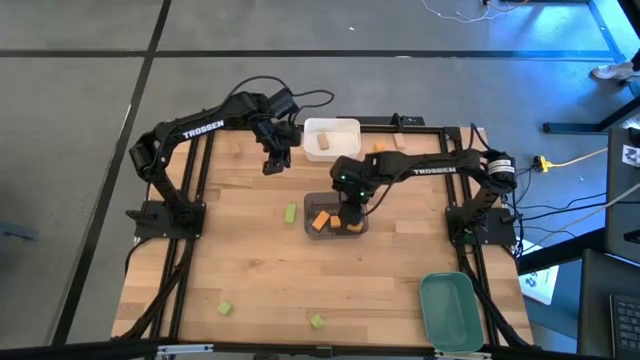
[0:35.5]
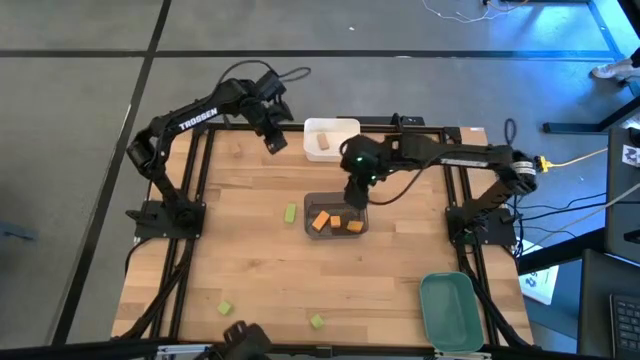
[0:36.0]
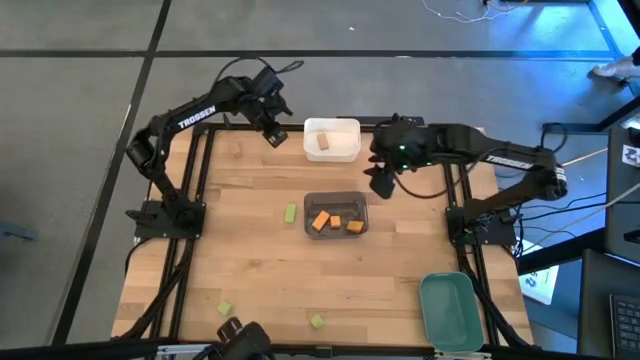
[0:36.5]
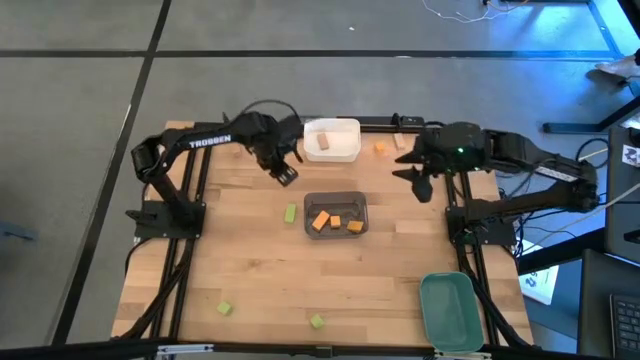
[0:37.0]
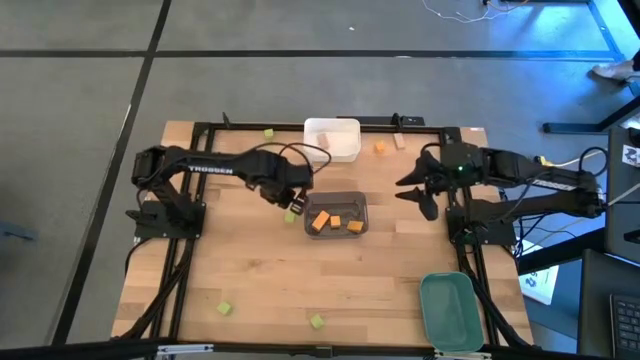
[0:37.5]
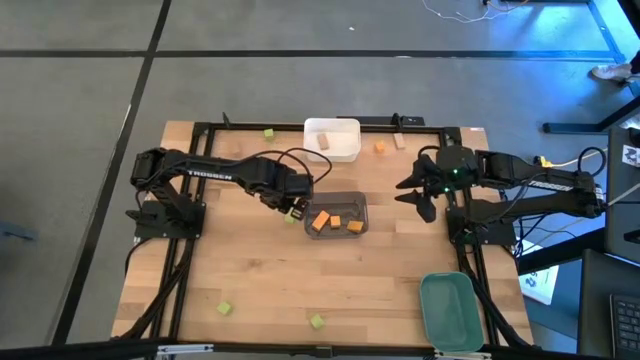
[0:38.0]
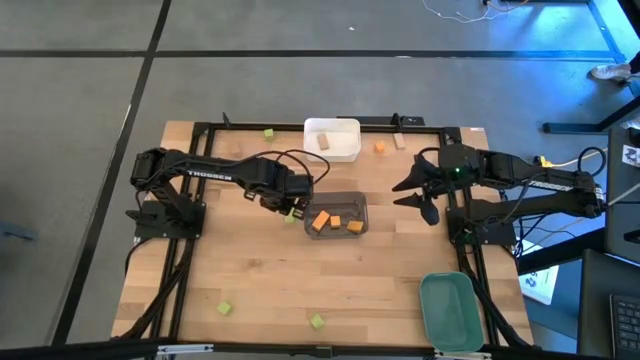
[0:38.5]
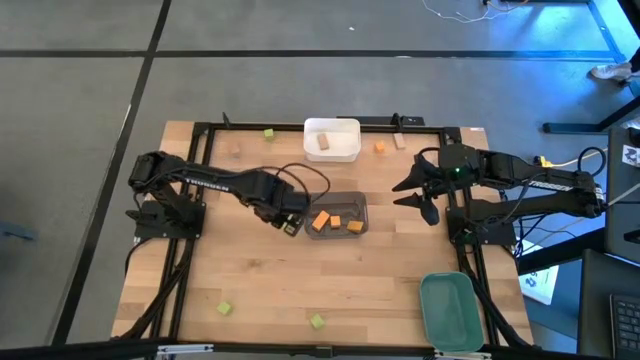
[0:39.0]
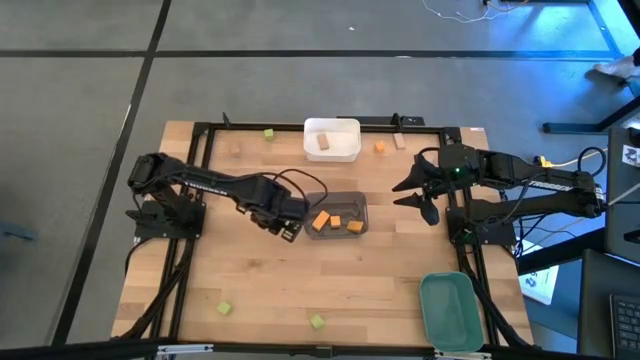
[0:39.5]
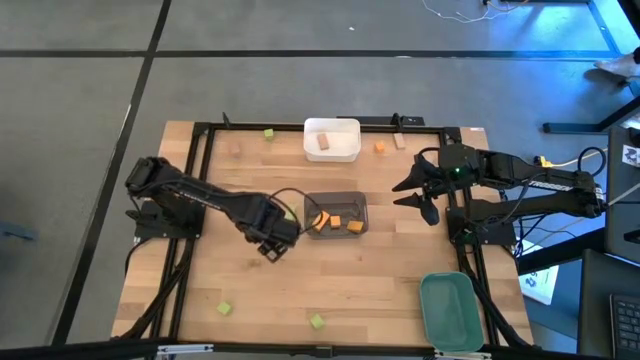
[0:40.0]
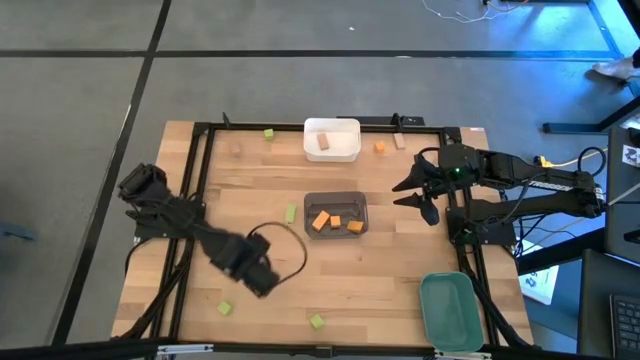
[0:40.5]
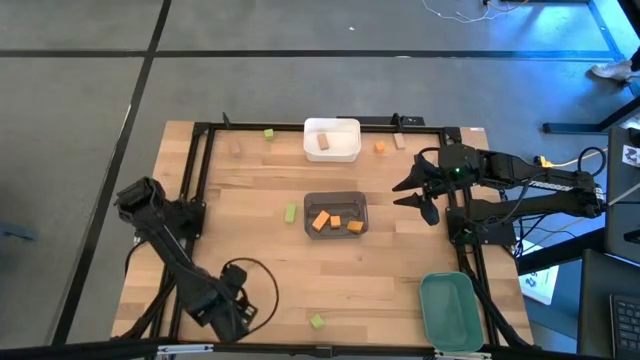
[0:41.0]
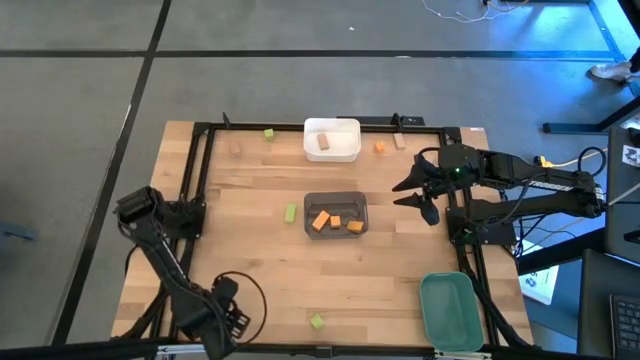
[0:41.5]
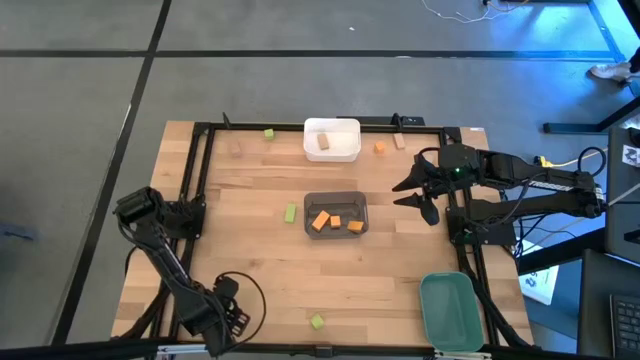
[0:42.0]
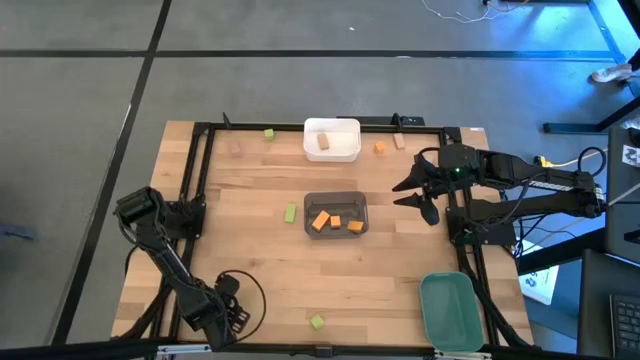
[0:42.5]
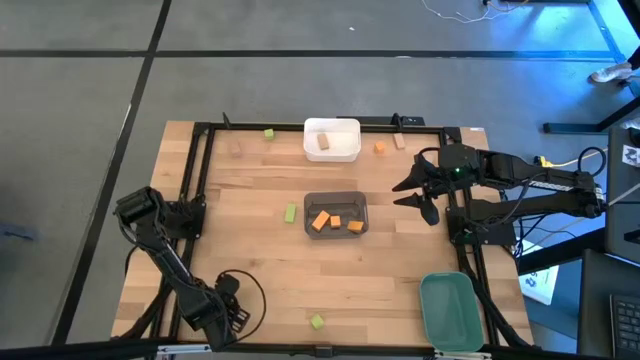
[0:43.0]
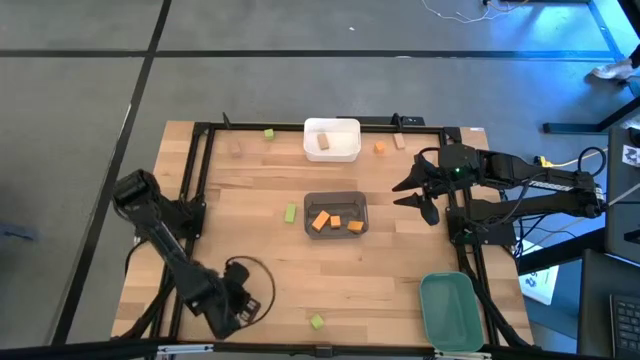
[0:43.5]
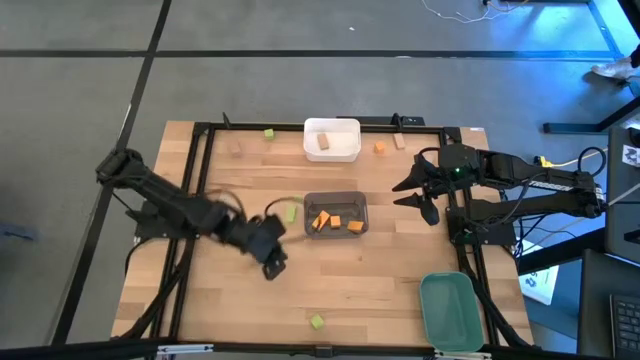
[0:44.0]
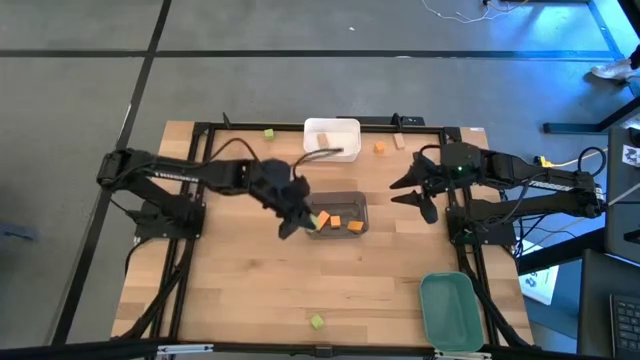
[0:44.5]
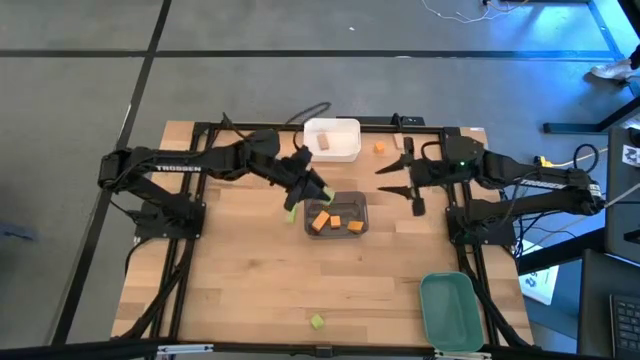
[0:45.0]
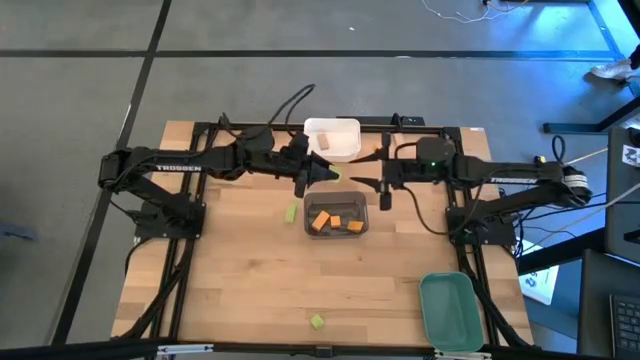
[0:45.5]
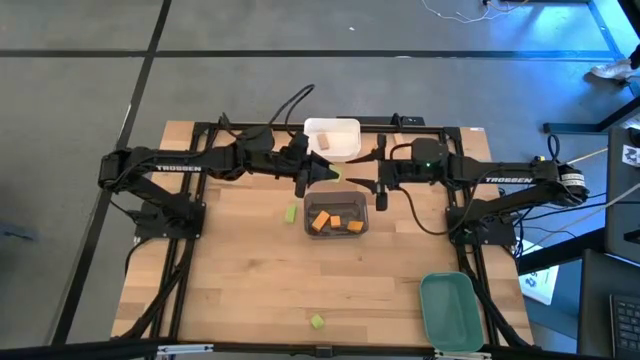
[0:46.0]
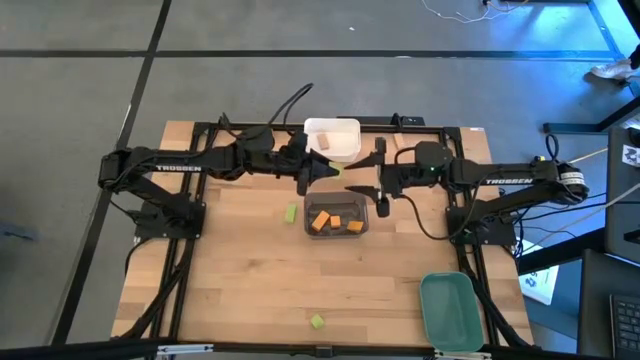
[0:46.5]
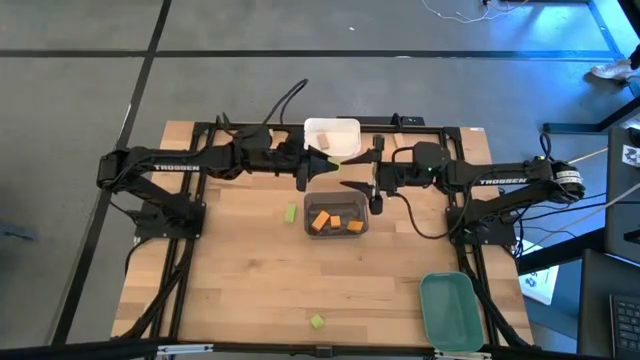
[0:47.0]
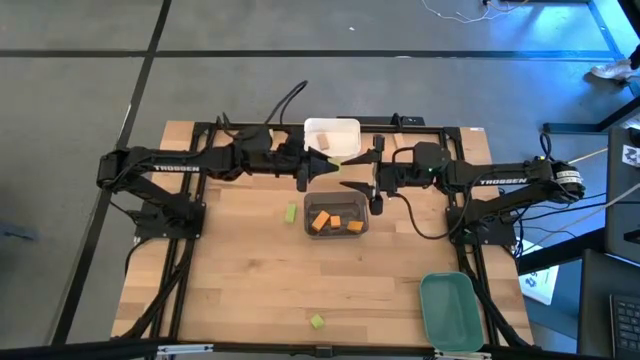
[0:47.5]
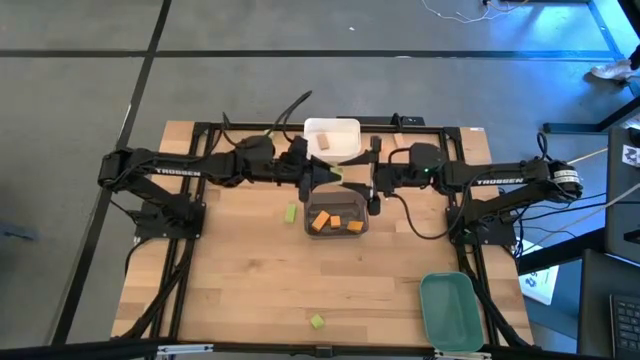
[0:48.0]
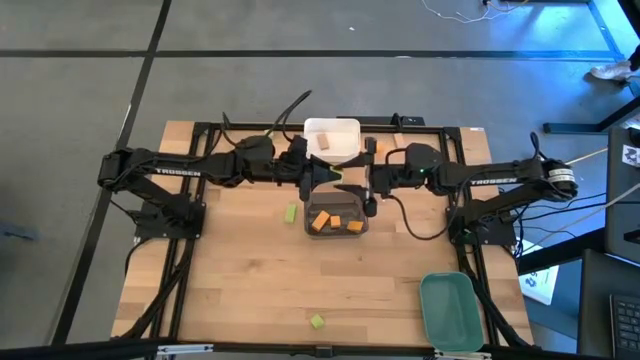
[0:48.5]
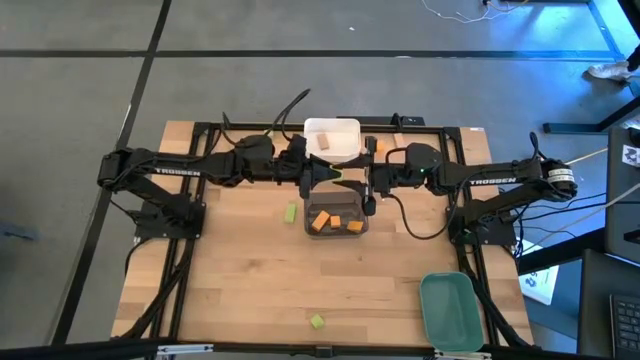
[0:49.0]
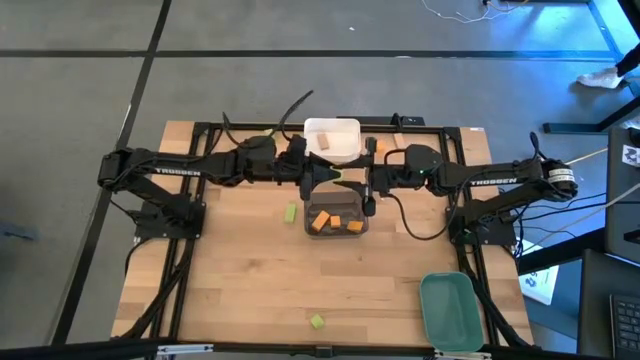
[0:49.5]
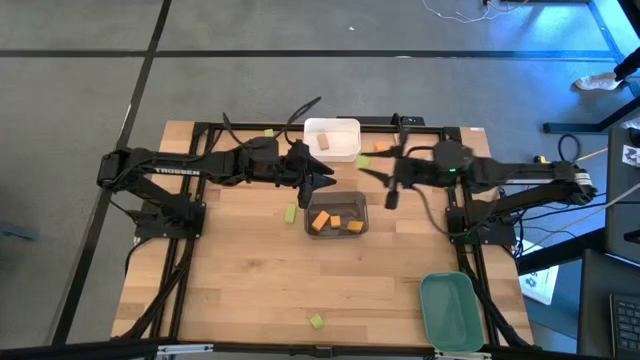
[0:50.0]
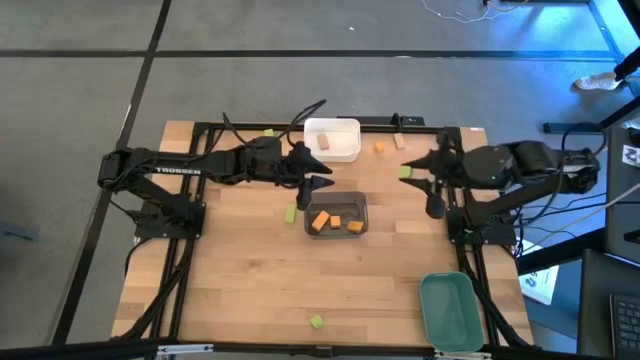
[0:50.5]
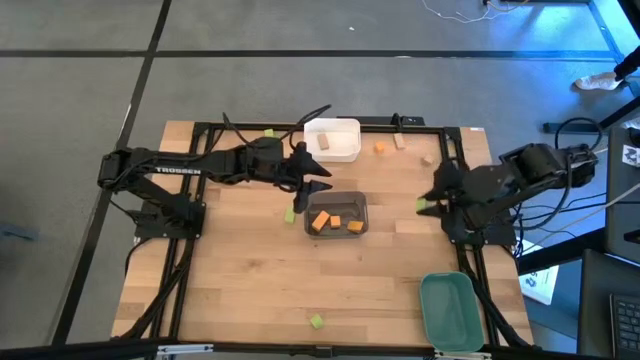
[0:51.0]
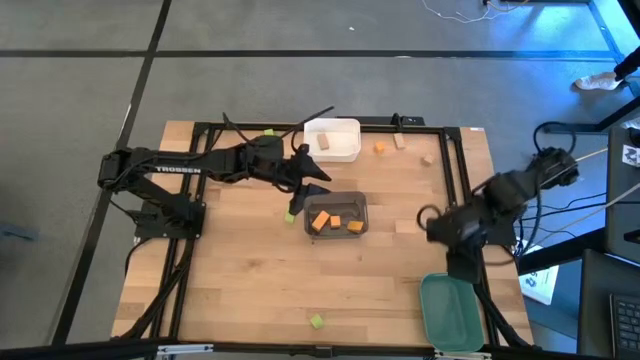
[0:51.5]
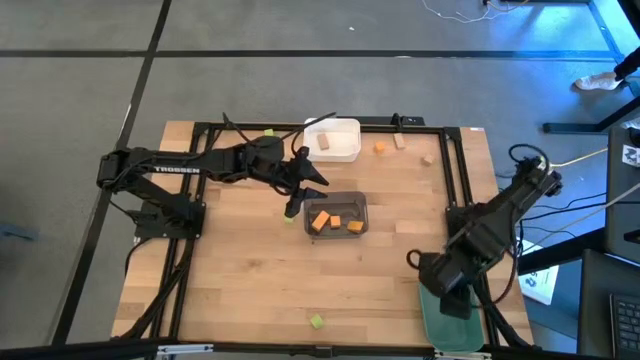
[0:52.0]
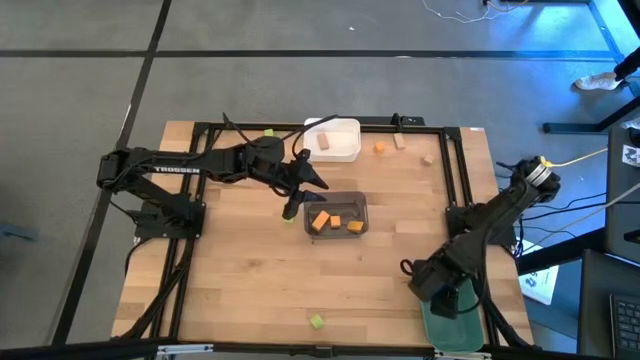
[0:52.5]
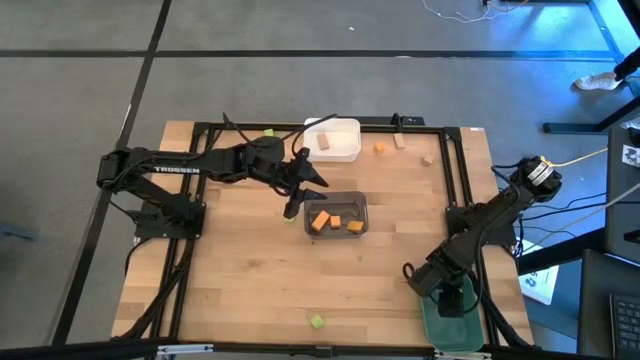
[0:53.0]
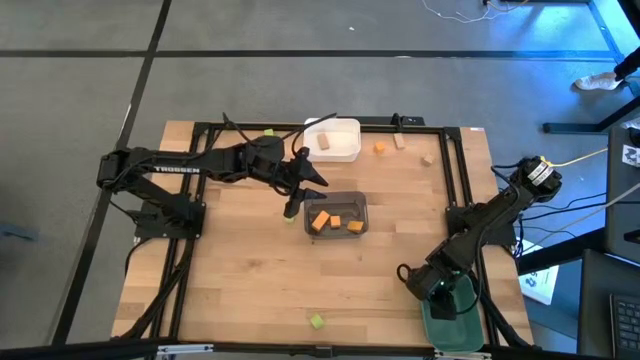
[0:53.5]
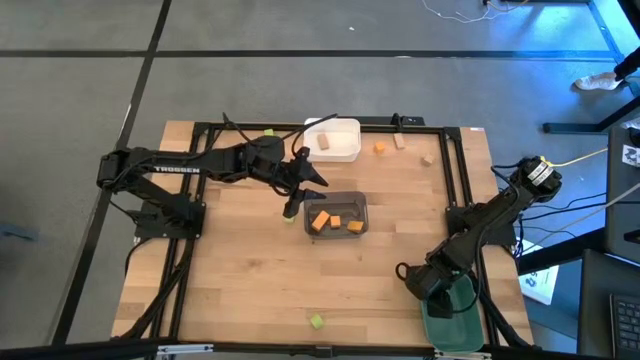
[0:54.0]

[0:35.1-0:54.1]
Task: Sort & place blocks by color
Put the green block into the green bin

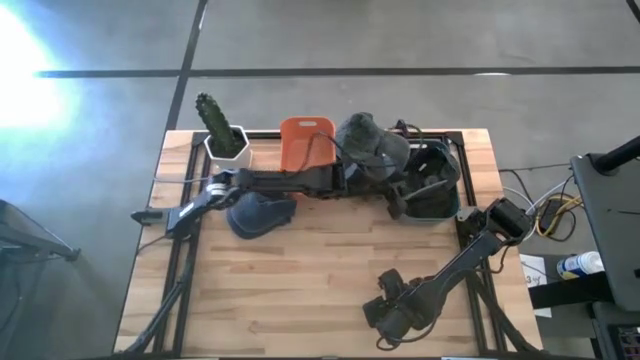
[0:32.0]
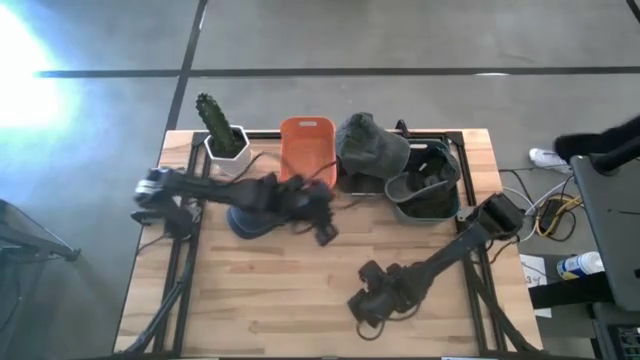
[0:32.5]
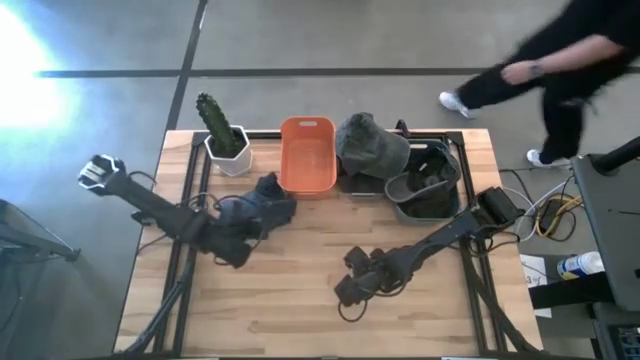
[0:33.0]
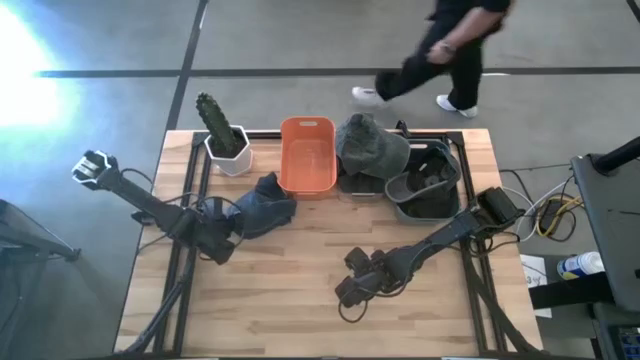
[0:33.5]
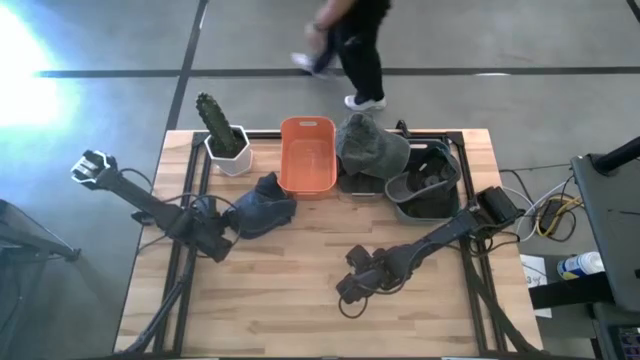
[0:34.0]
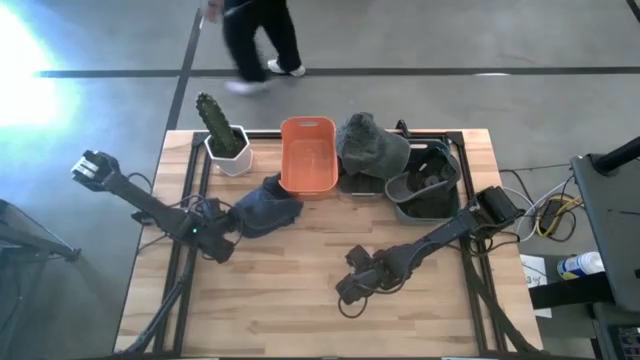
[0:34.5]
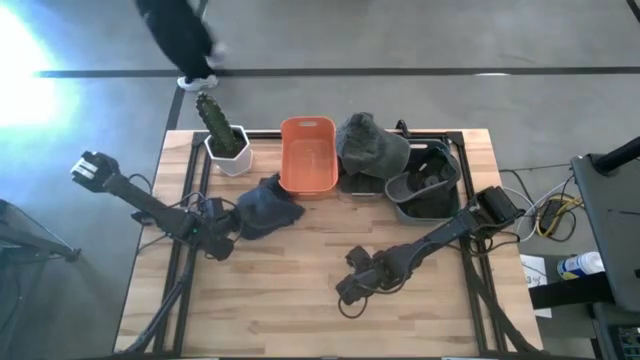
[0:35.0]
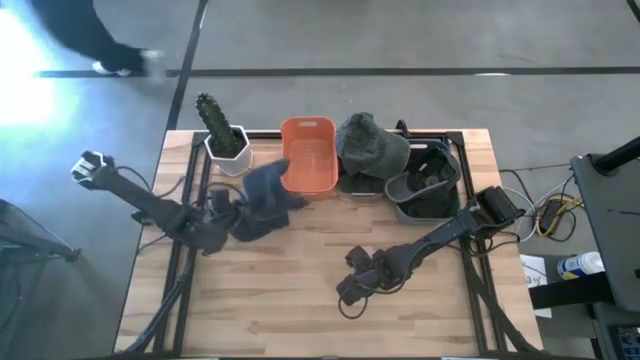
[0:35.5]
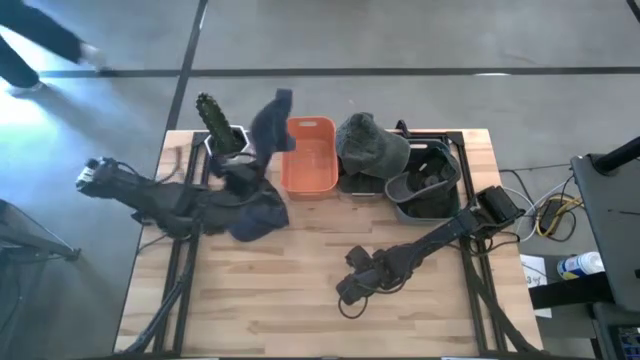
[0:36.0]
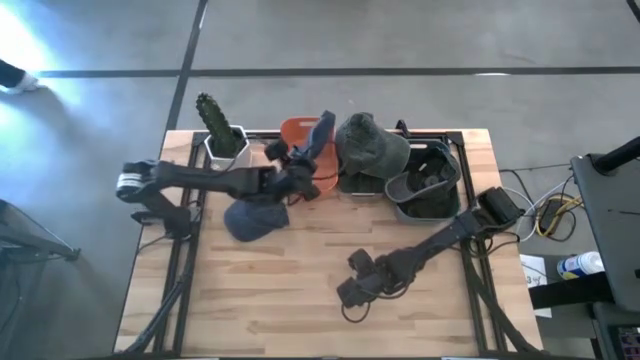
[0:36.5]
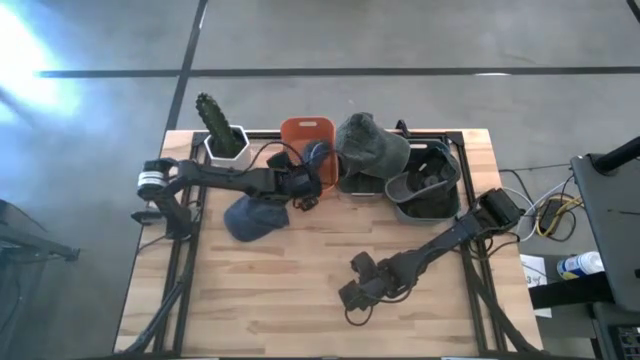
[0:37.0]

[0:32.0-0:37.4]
Task: Pick & Place hat
Put the blue cap into the orange bin
